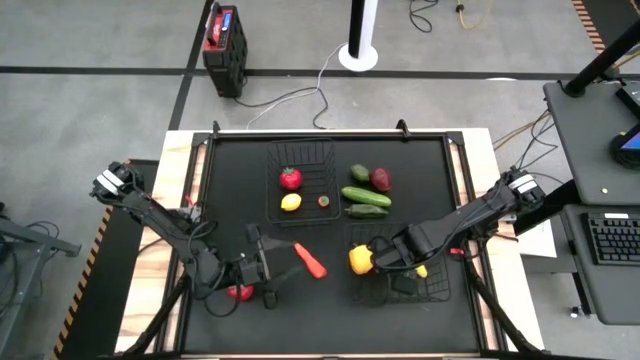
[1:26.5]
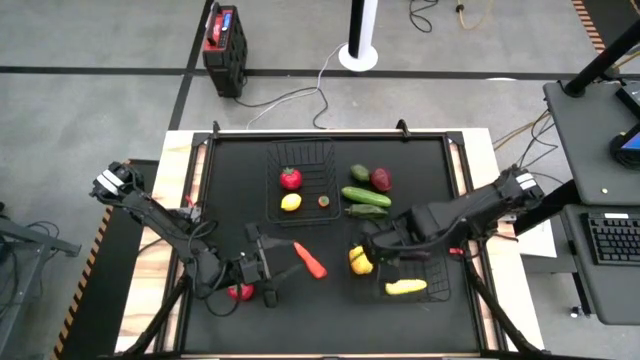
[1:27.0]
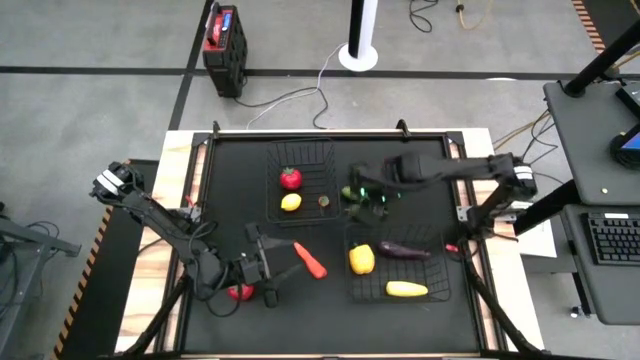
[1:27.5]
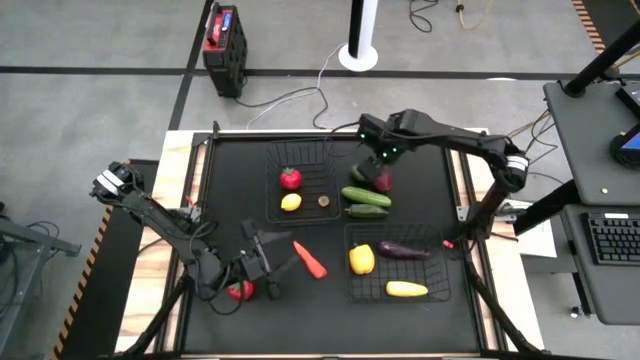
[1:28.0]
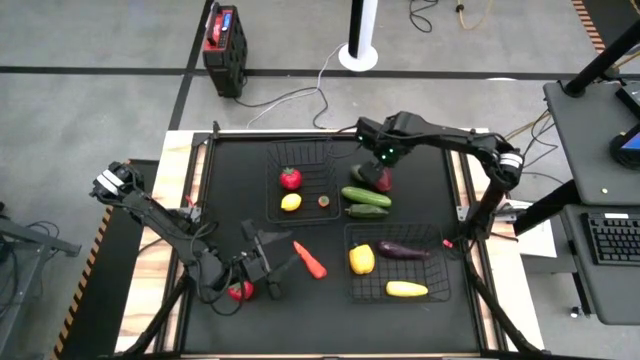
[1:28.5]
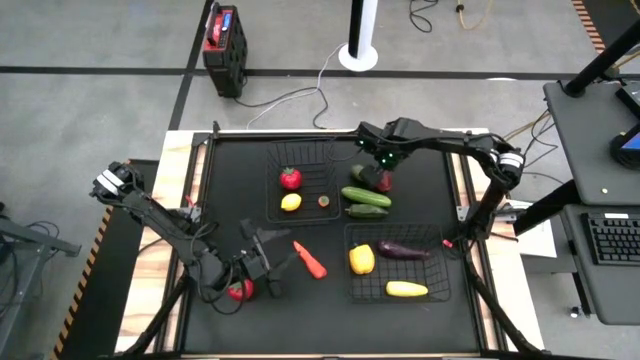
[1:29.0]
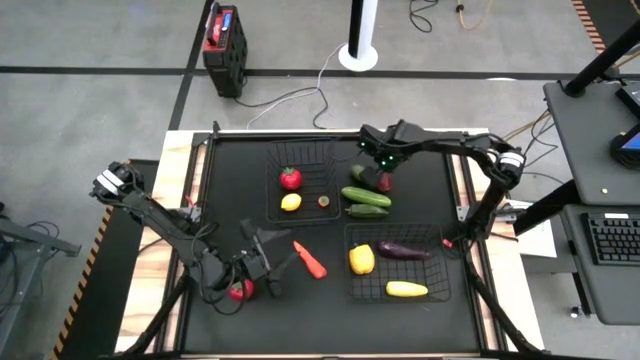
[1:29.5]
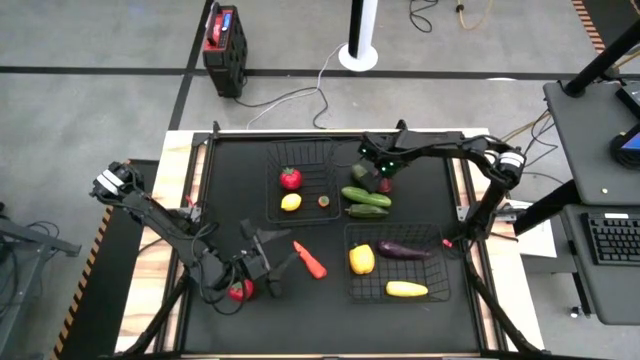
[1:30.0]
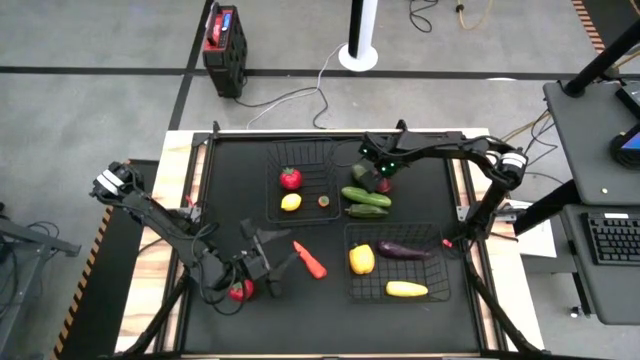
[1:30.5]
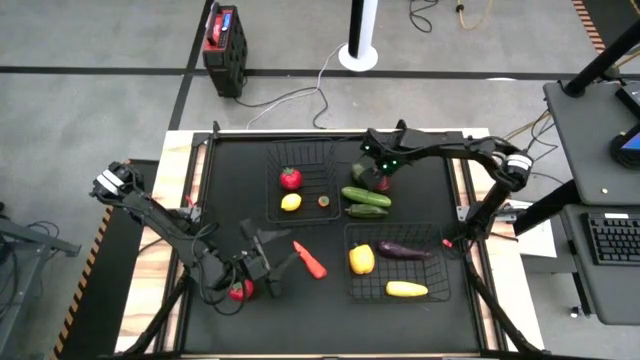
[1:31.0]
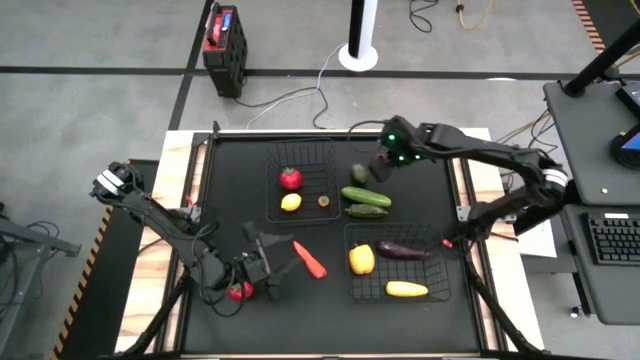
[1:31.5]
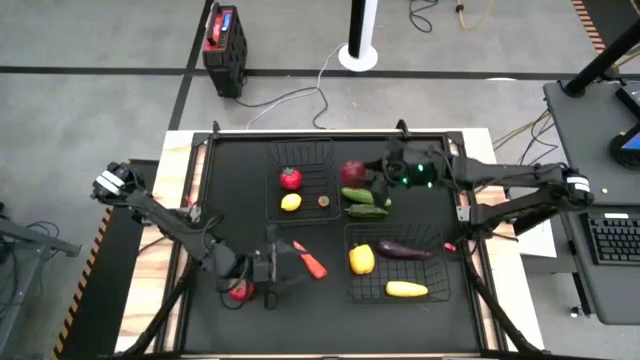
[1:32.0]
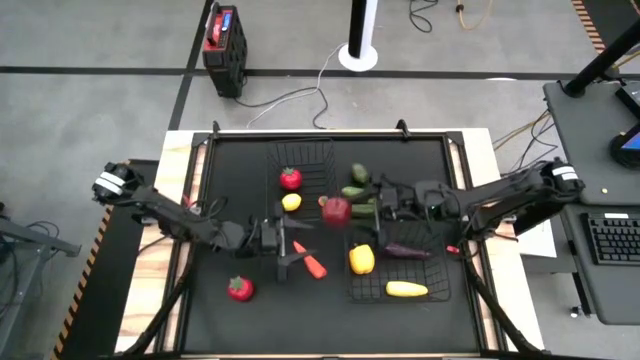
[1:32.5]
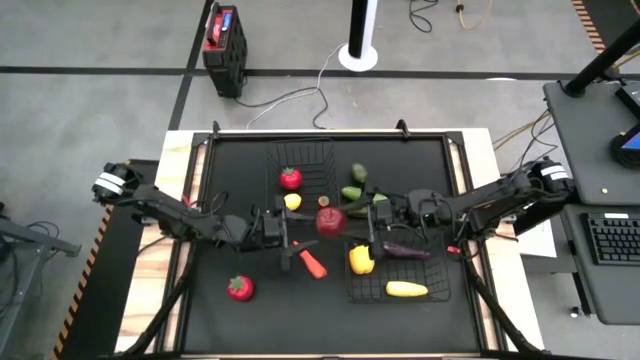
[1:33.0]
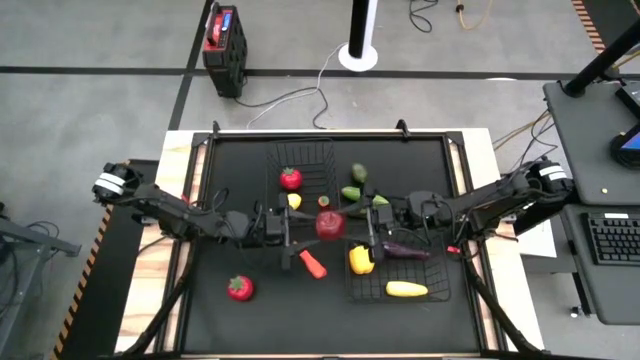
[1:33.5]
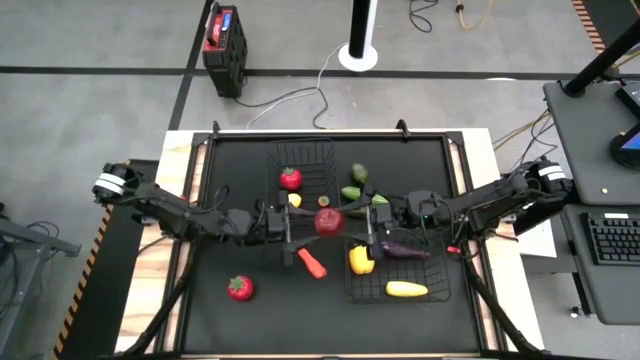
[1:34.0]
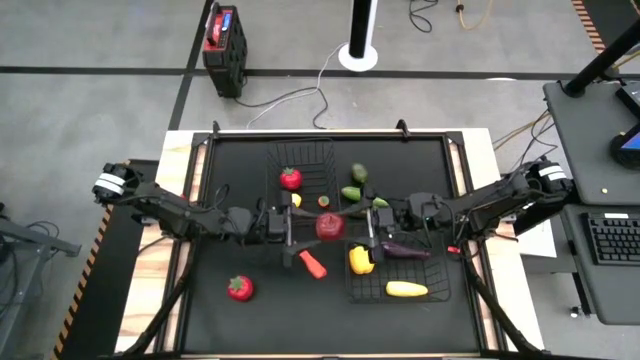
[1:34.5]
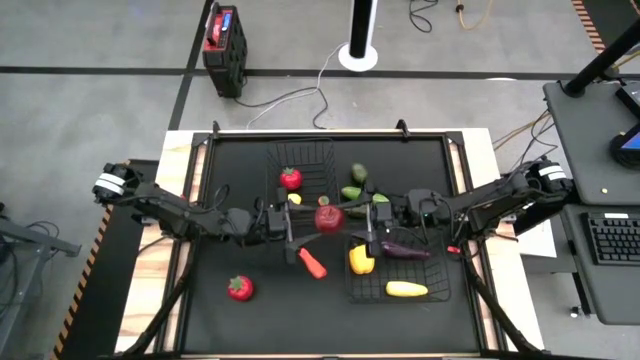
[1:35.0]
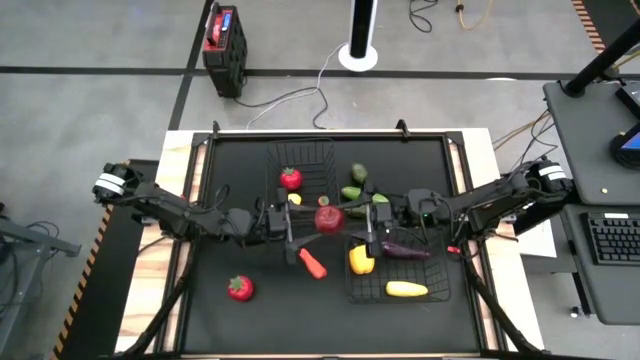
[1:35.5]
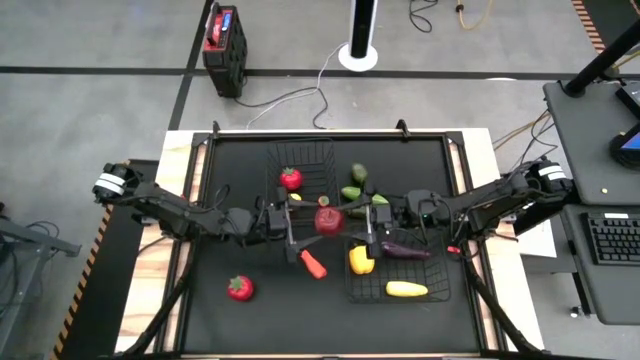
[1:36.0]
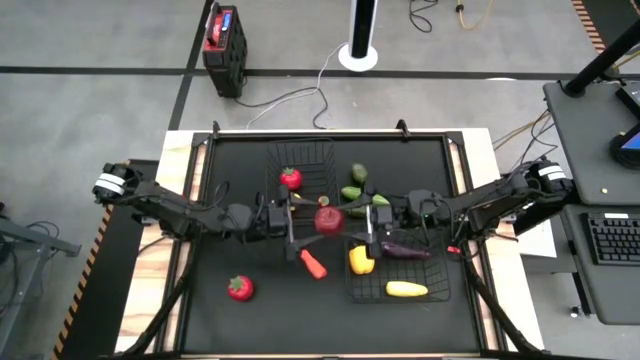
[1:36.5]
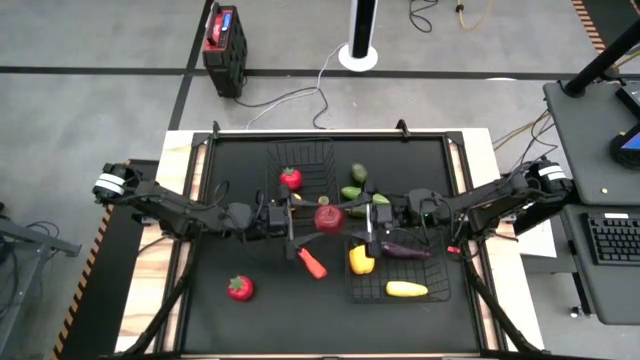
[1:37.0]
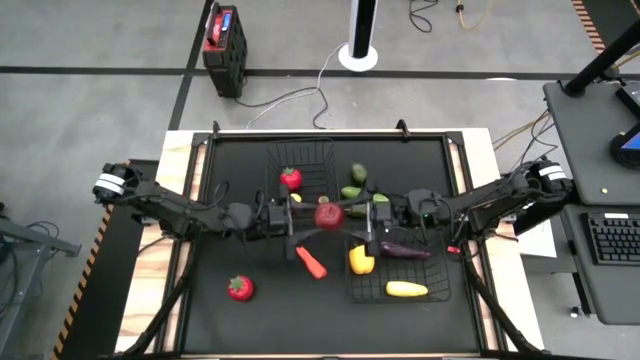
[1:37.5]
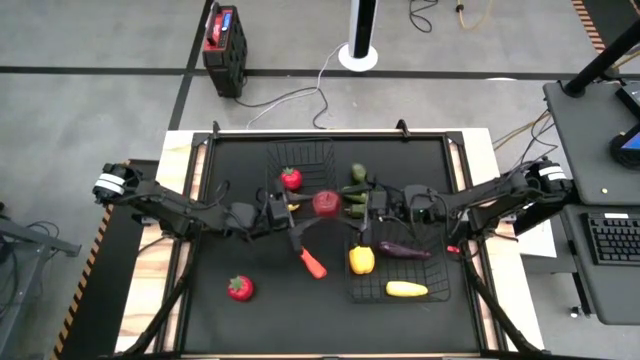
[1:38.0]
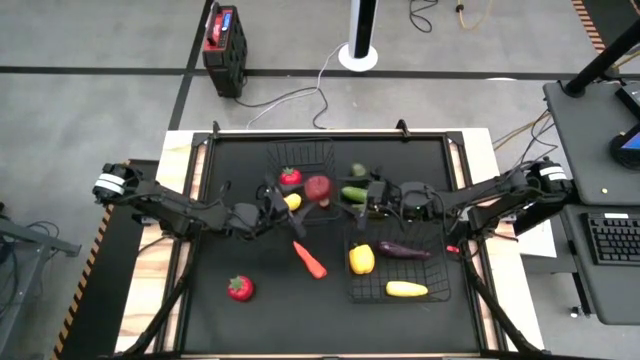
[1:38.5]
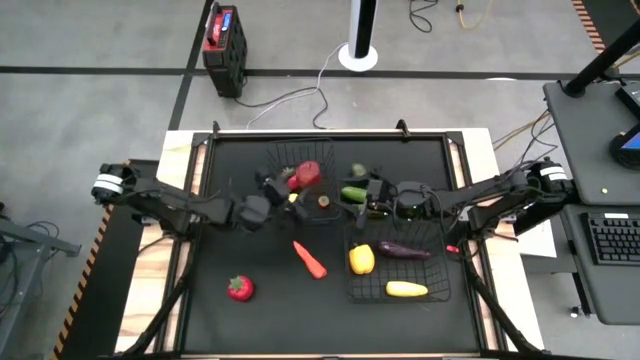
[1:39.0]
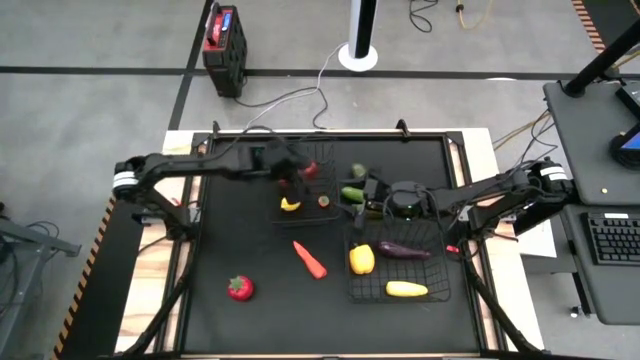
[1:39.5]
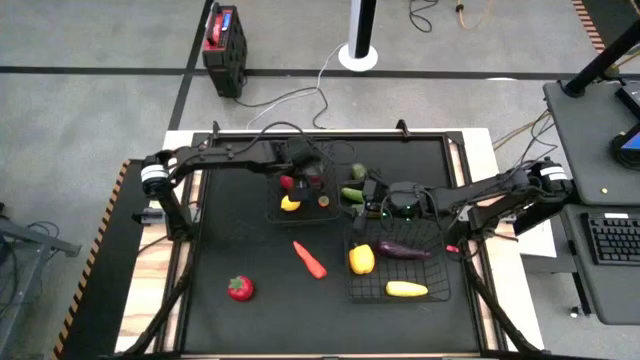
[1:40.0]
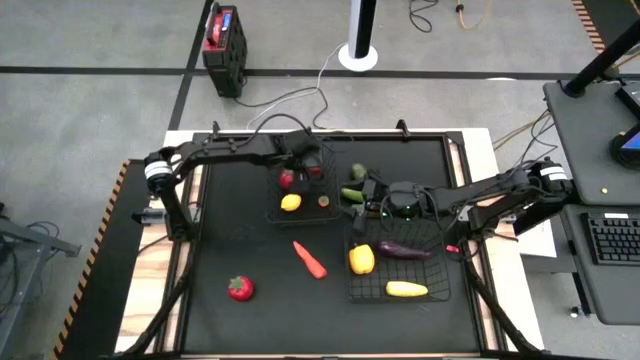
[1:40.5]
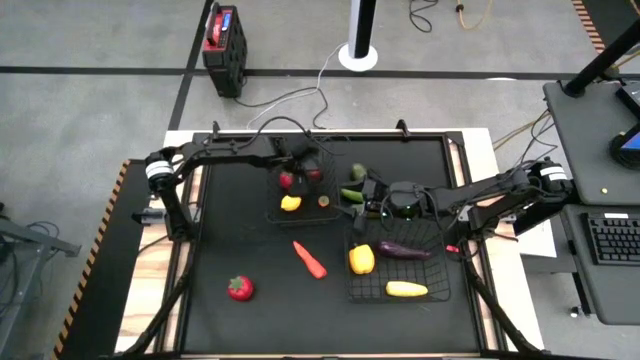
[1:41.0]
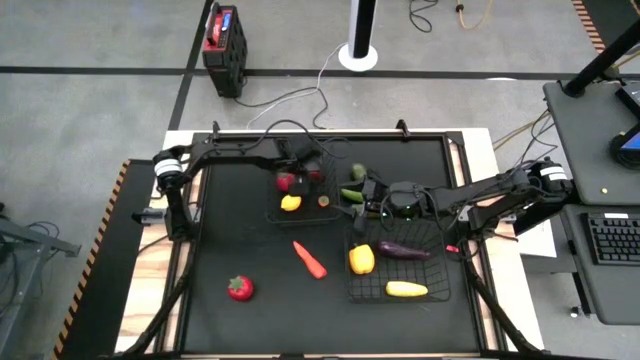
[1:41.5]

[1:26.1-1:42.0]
Task: Sort produce into baskets
Put the apple into the top black wire basket

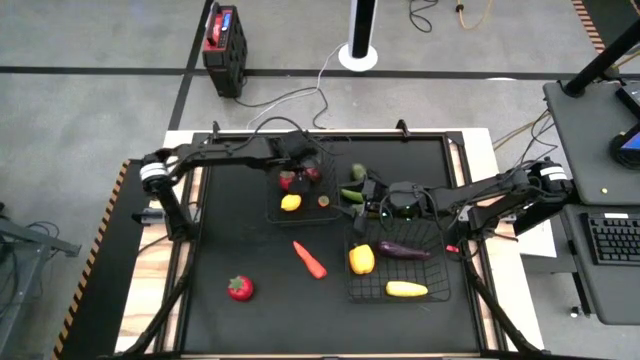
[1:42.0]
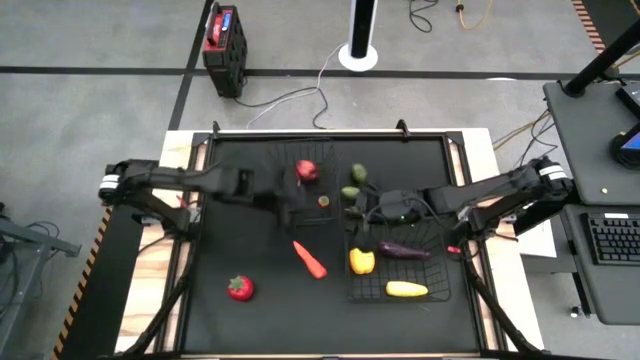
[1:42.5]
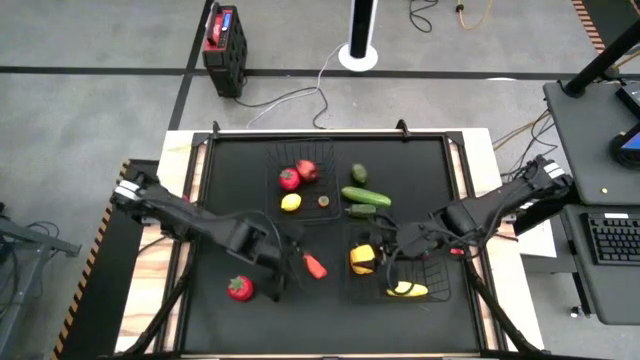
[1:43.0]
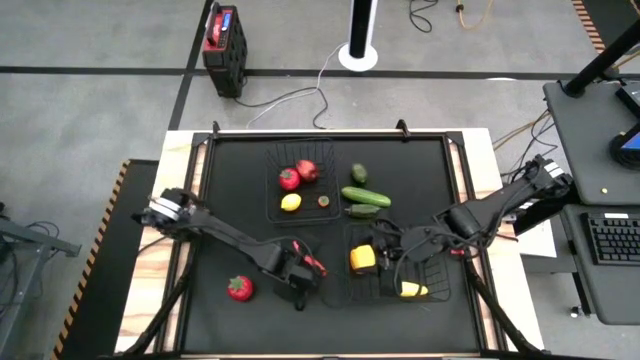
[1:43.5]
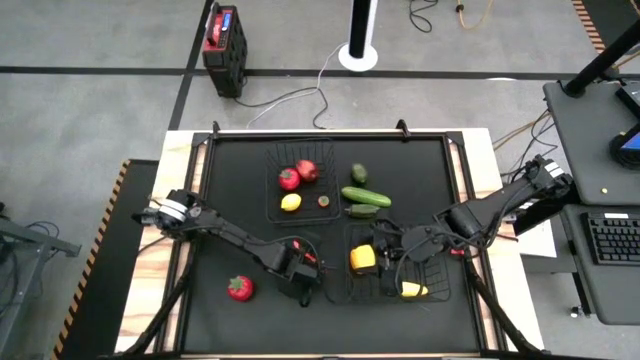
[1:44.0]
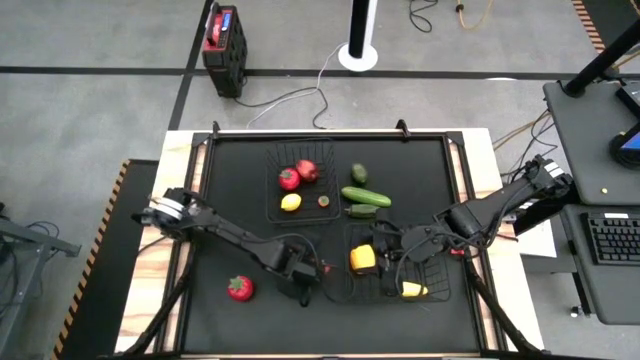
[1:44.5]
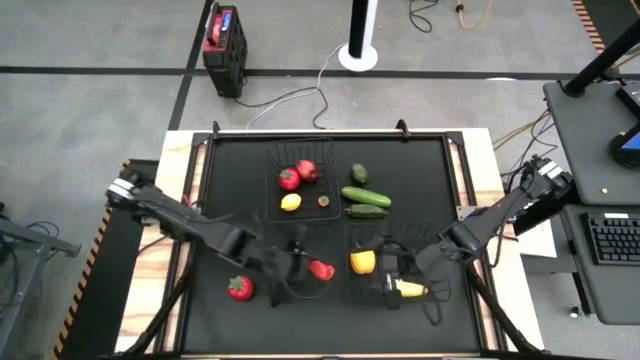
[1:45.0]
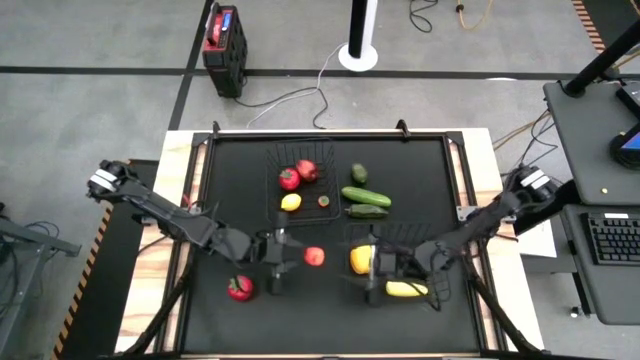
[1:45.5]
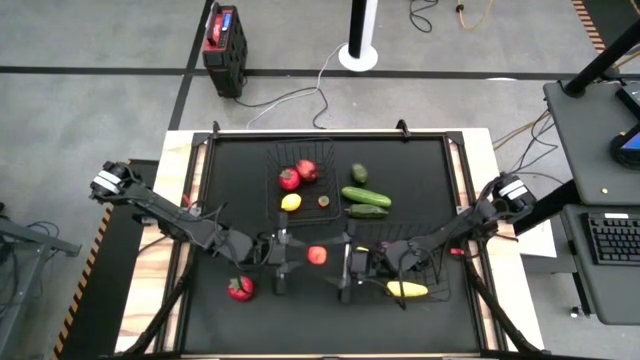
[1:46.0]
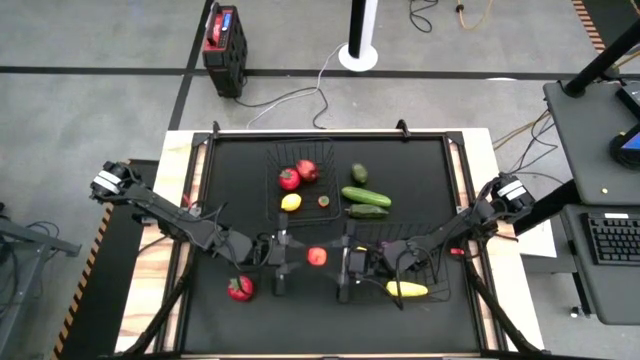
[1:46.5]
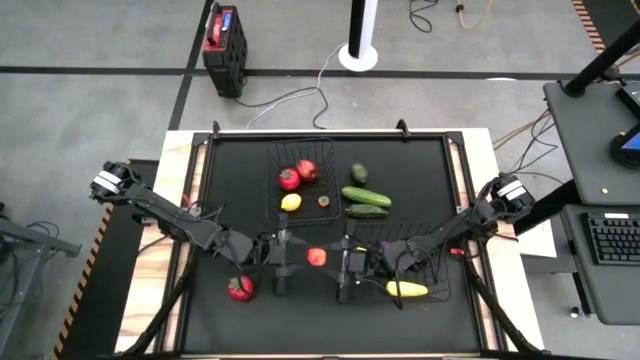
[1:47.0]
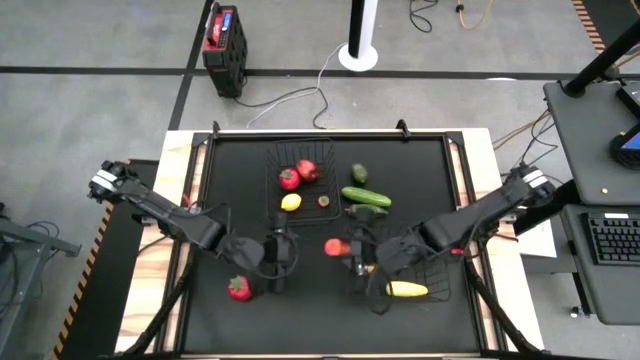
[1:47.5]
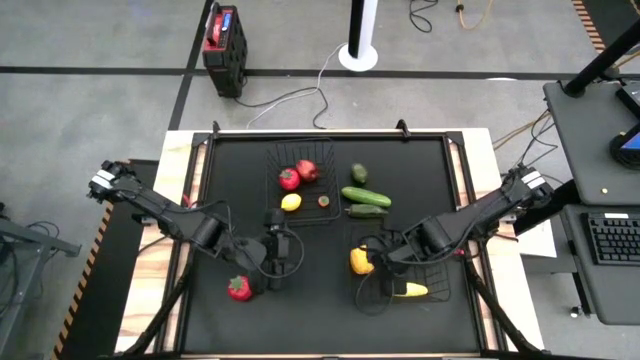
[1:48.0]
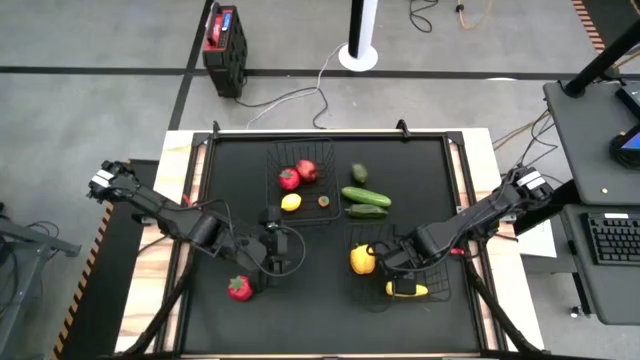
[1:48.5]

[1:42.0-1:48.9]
Put the carrot into the bottom black wire basket
